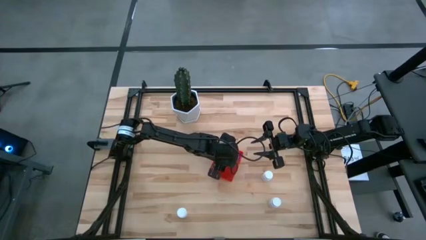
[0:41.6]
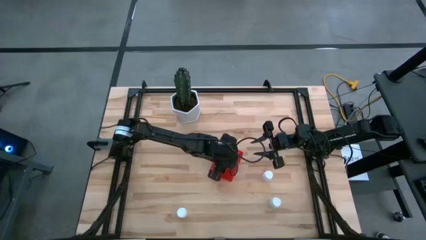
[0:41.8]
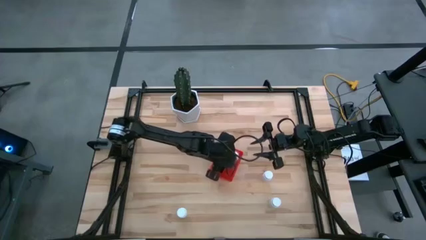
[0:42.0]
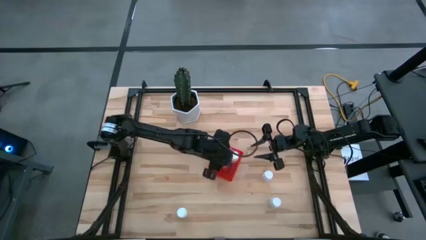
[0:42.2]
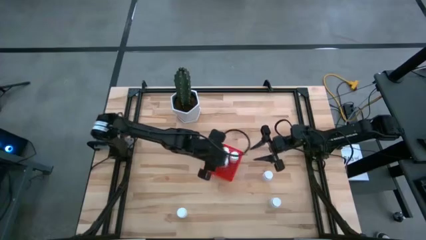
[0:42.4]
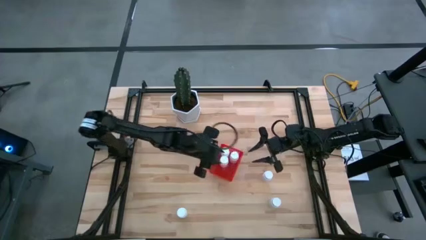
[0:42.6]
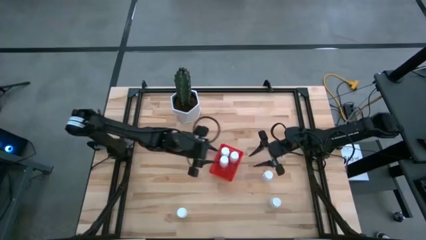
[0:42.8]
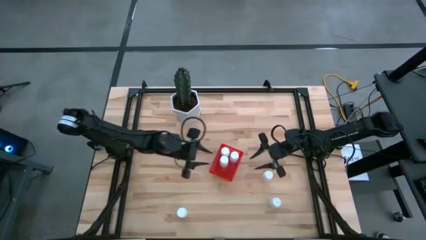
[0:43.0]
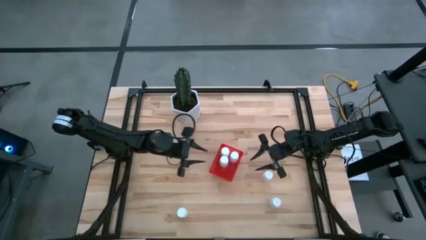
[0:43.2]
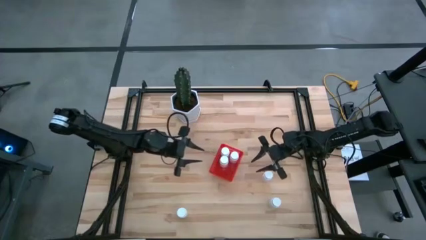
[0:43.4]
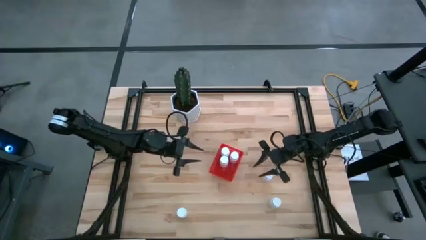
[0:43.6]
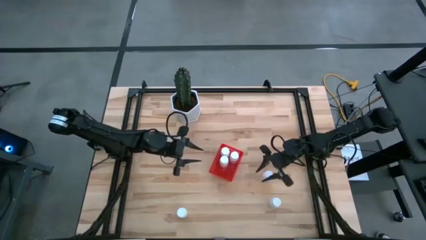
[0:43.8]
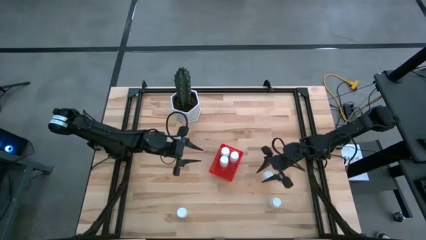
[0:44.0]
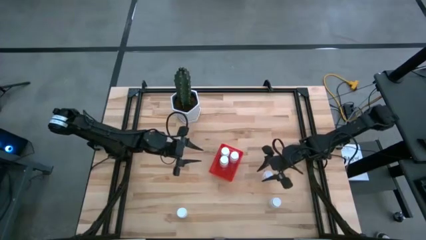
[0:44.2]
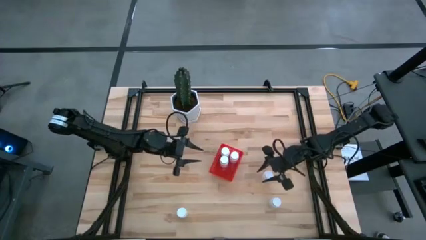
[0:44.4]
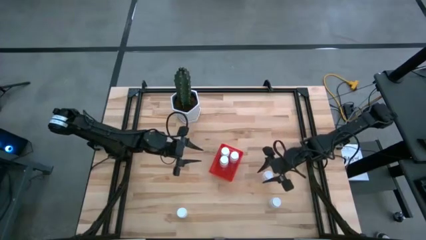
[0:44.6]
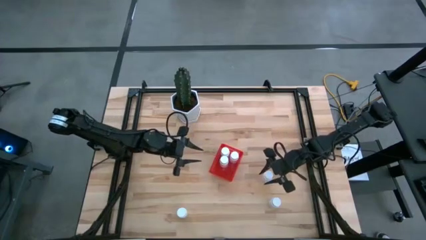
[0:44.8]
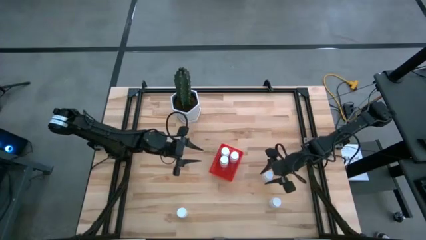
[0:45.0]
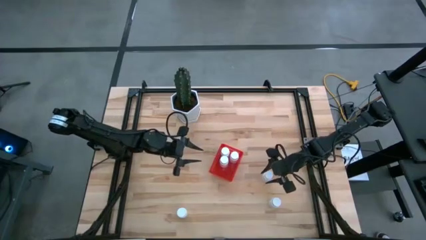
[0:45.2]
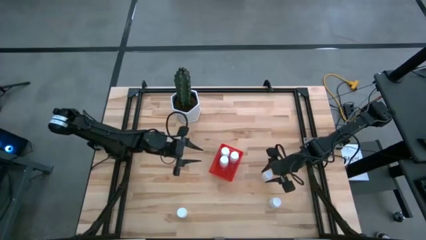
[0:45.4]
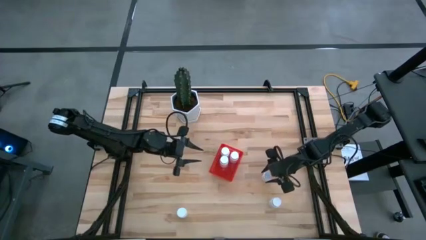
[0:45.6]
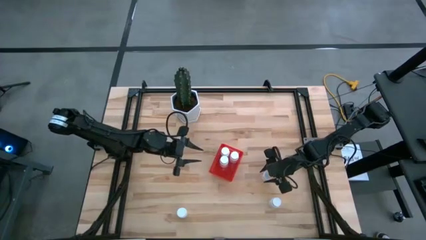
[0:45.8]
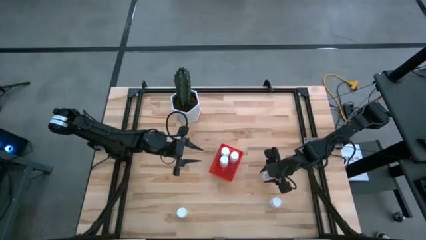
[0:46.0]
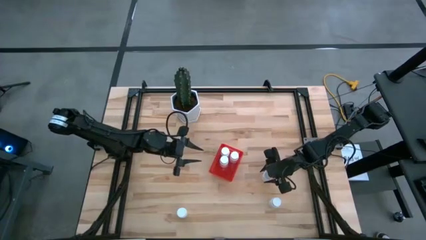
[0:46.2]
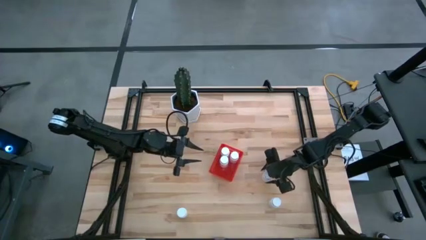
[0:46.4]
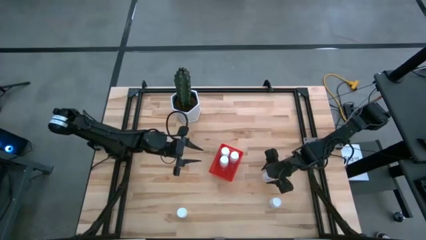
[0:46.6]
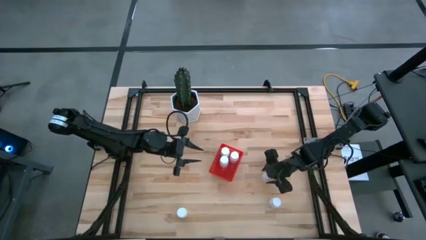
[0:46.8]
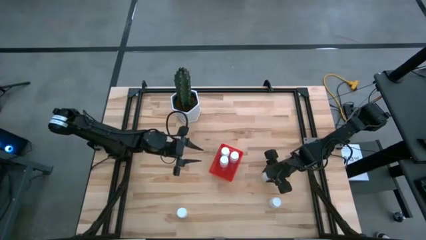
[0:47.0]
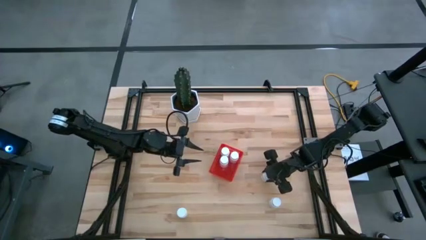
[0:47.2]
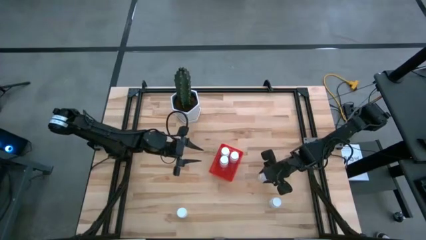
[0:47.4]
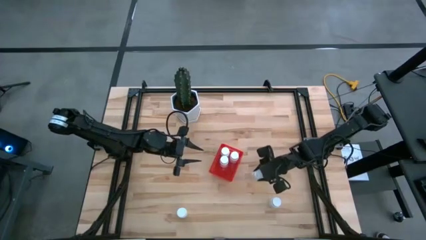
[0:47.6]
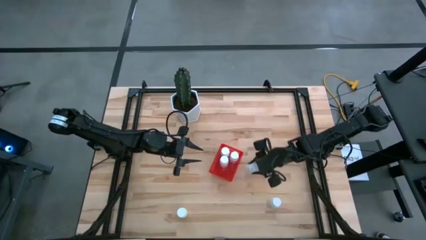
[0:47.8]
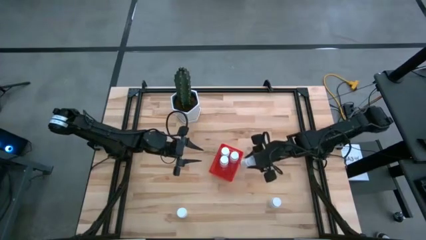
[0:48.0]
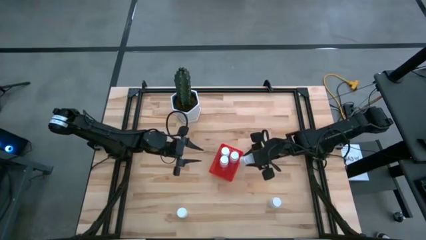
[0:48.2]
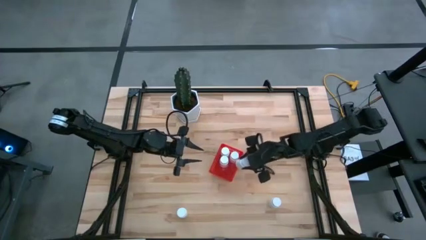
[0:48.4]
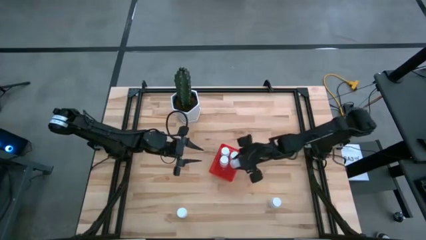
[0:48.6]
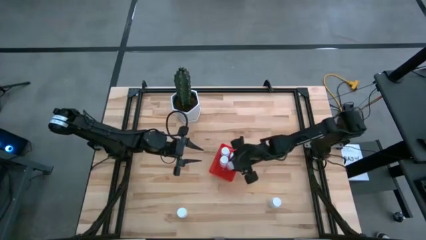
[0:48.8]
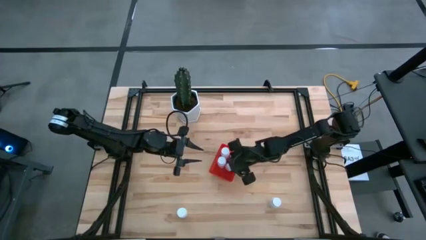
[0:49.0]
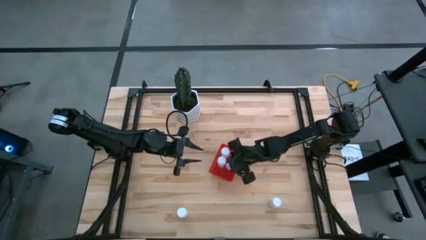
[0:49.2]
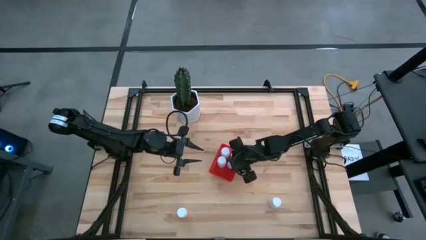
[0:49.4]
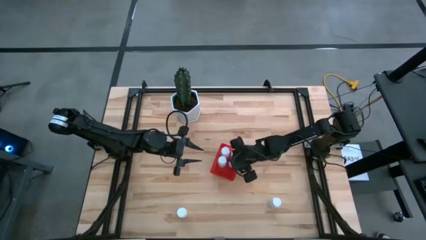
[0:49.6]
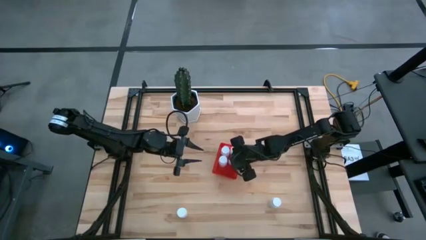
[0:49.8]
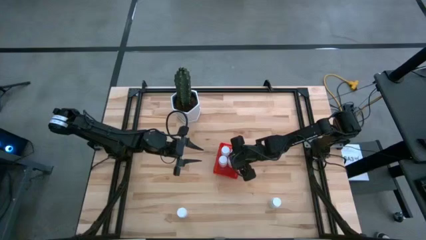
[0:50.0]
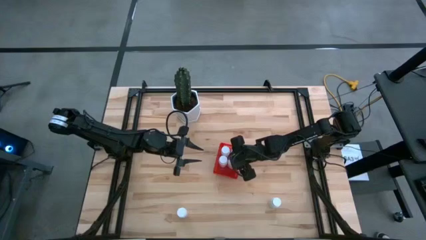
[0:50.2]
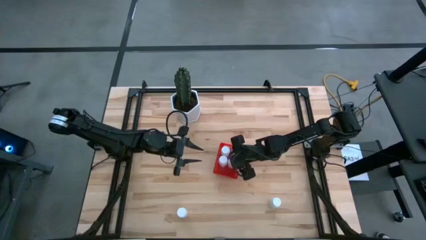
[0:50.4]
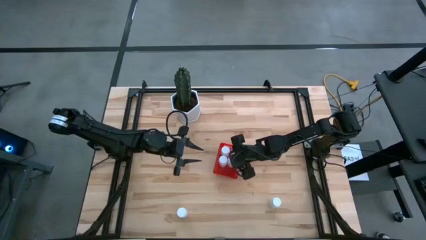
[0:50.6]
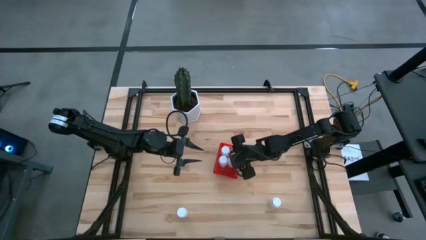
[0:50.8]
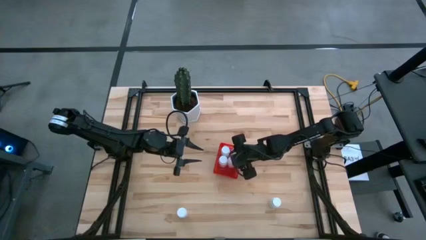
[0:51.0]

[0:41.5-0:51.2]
Task: Pick and place pill bottles into a basket
Put the top white pill bottle into the red bin

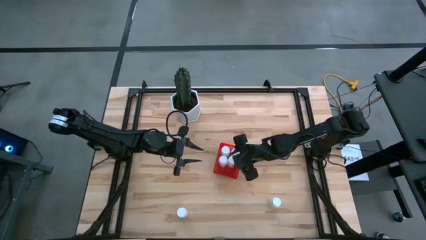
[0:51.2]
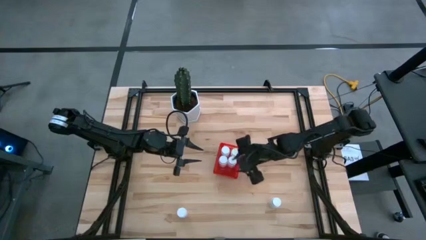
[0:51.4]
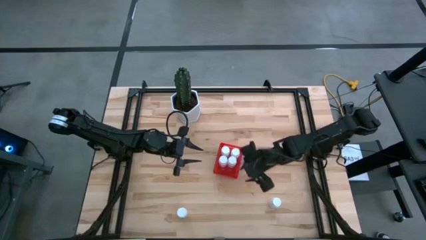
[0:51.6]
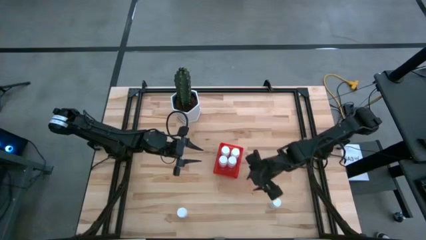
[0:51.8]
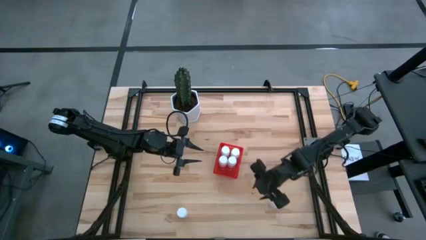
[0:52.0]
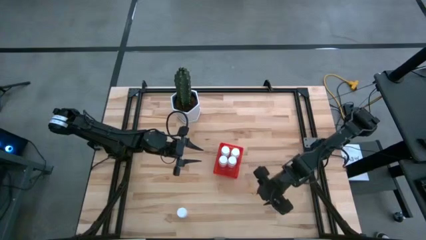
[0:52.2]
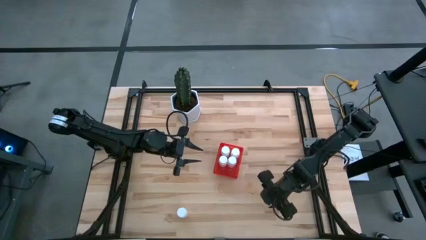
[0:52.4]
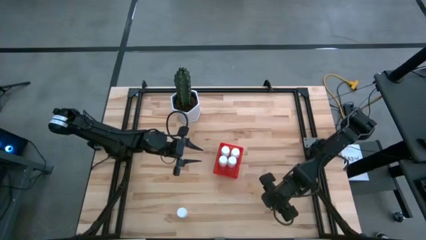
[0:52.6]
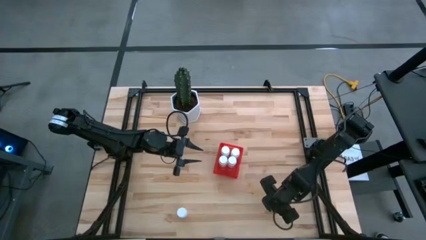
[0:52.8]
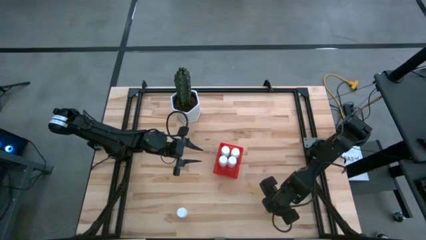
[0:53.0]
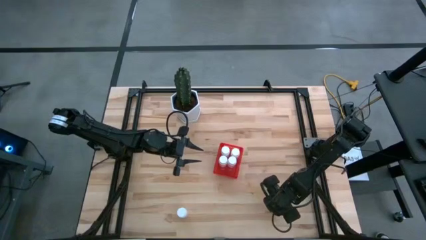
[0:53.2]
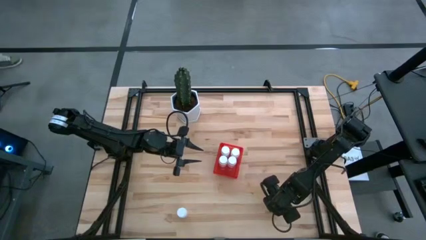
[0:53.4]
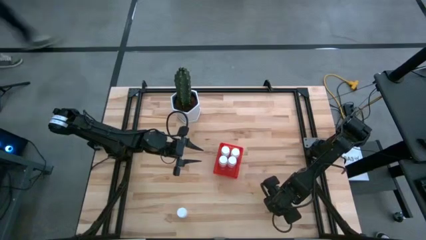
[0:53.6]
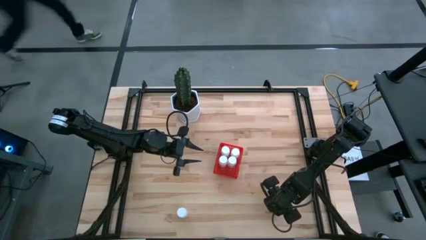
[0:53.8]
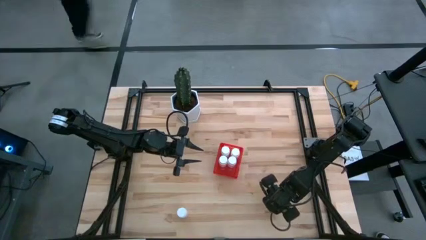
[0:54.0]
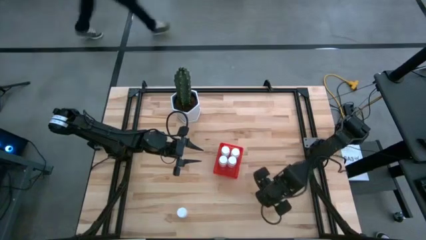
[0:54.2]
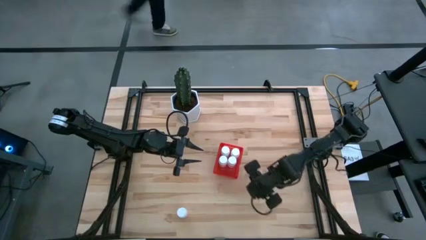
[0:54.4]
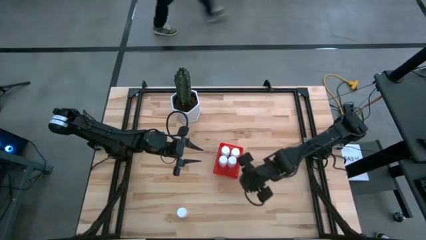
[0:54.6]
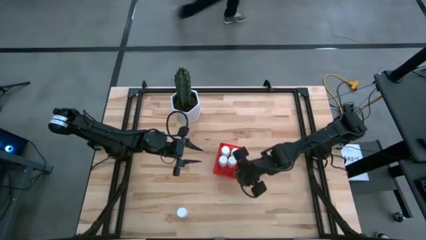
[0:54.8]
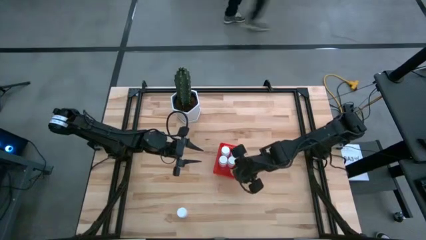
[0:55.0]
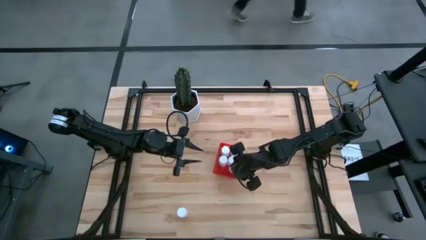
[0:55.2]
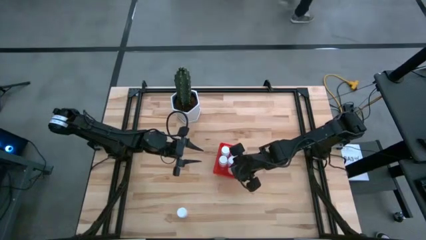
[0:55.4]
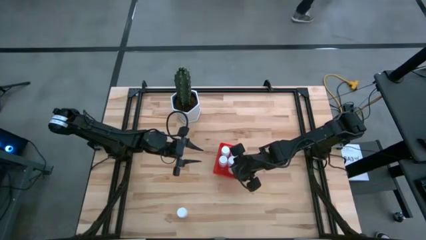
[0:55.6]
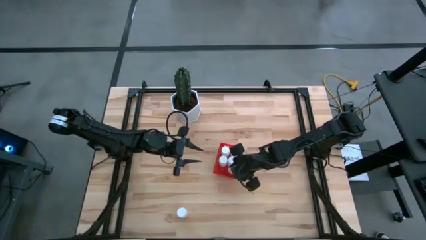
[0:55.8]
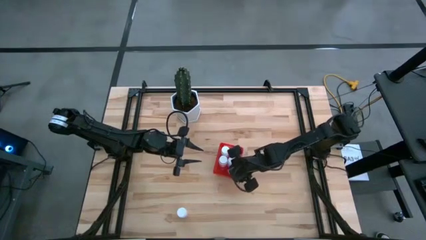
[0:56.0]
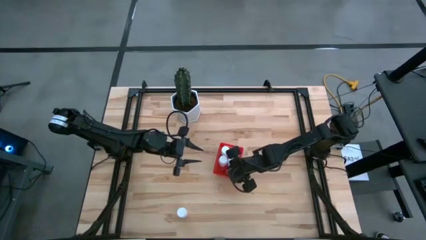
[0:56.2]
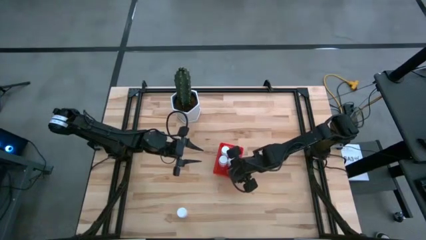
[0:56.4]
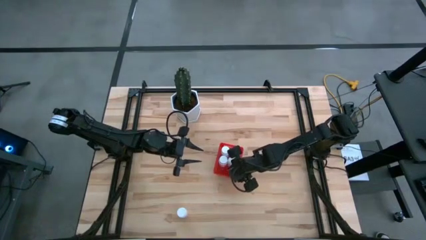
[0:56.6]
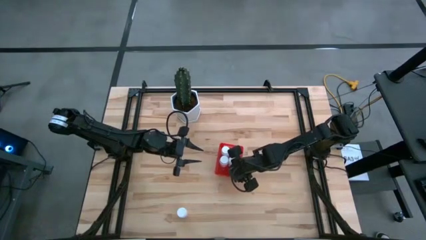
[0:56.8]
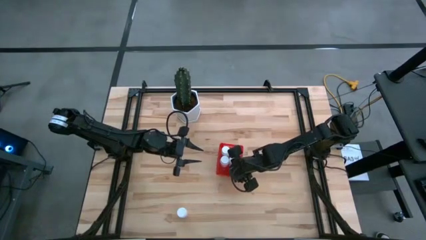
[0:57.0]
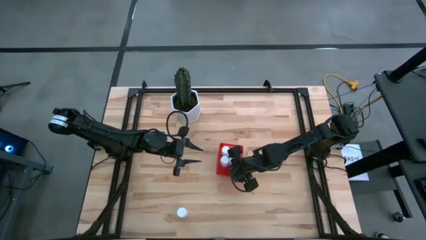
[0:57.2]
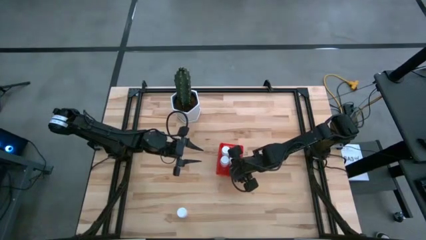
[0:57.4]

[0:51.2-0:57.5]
Put the right white pill bottle into the red bin
